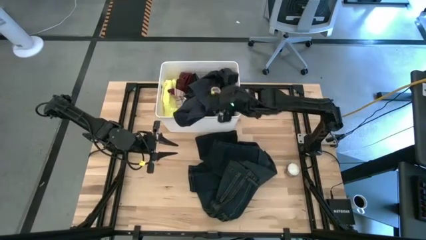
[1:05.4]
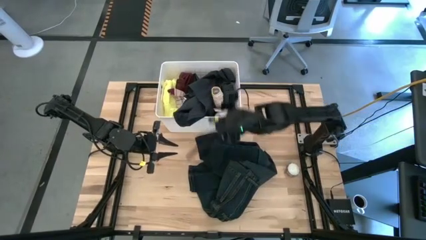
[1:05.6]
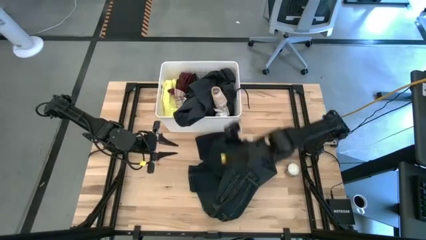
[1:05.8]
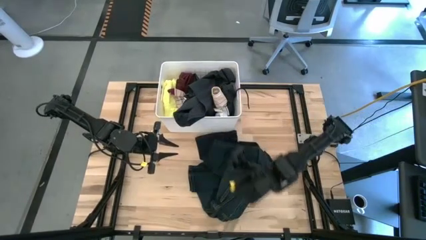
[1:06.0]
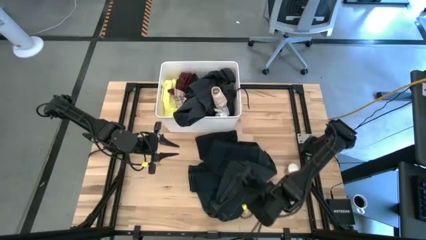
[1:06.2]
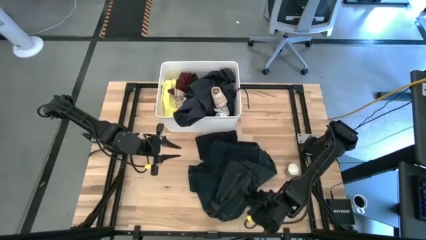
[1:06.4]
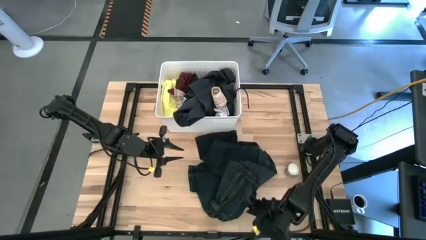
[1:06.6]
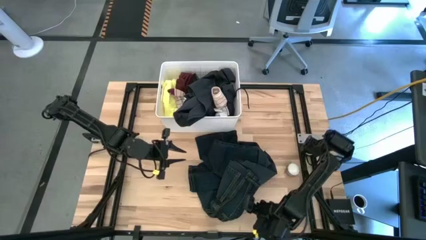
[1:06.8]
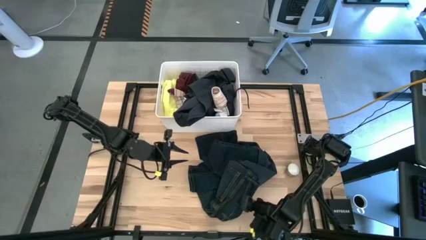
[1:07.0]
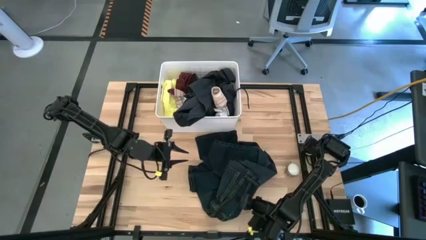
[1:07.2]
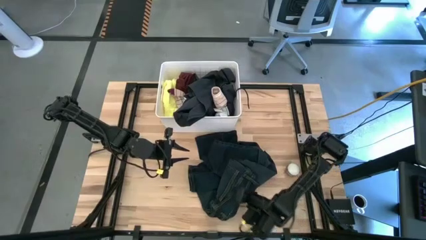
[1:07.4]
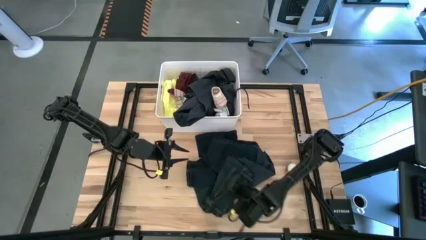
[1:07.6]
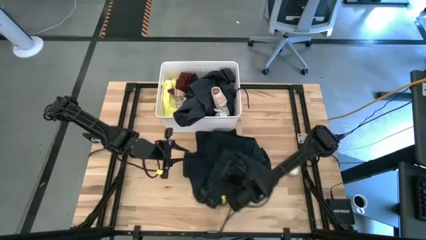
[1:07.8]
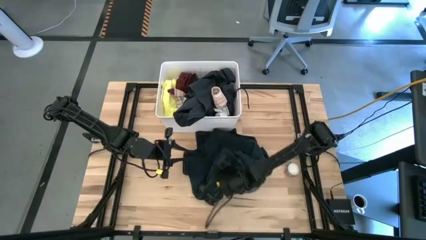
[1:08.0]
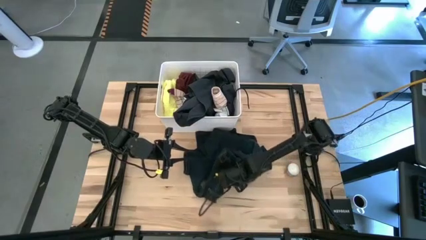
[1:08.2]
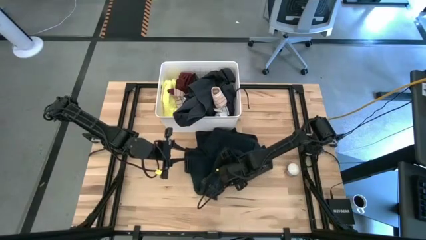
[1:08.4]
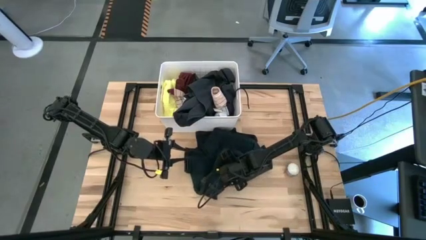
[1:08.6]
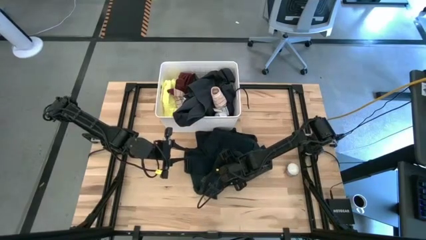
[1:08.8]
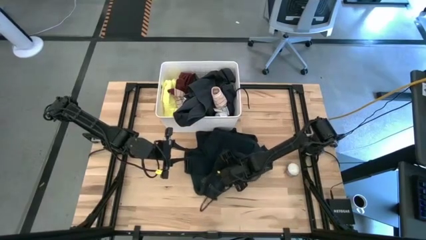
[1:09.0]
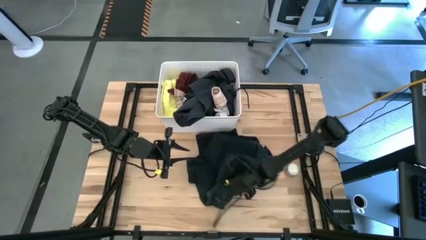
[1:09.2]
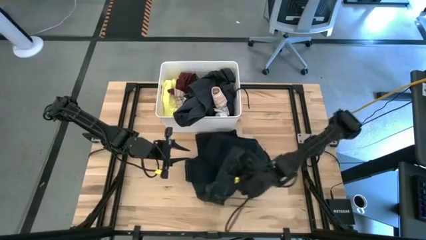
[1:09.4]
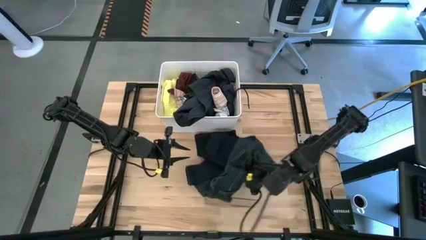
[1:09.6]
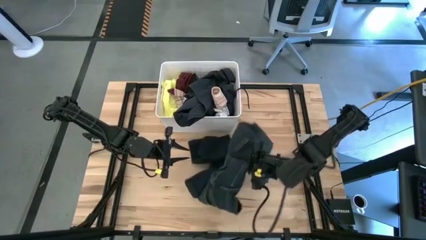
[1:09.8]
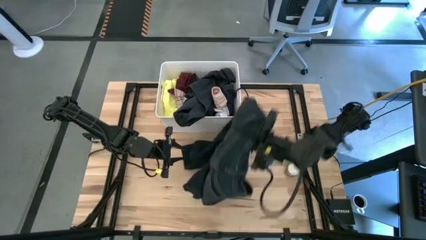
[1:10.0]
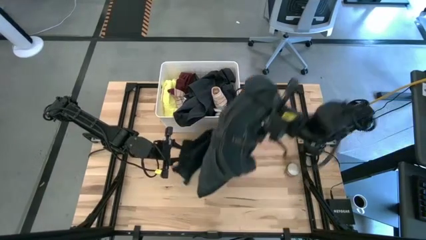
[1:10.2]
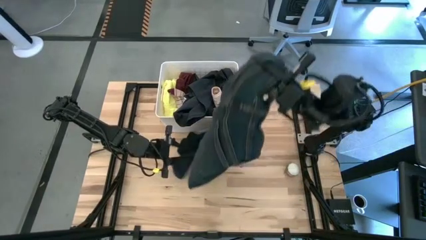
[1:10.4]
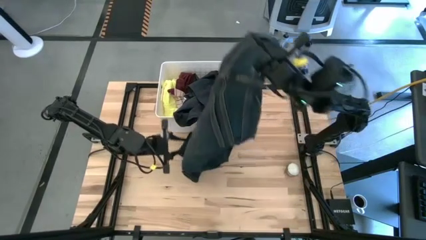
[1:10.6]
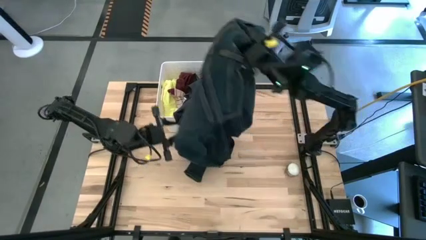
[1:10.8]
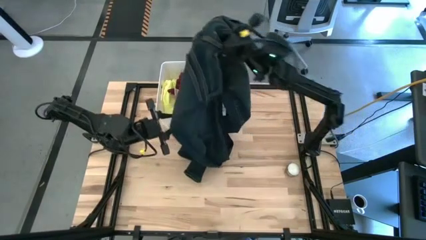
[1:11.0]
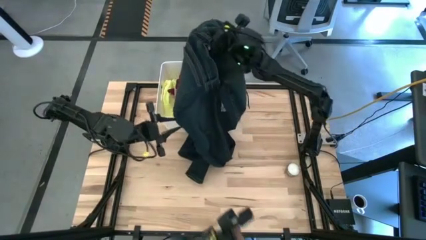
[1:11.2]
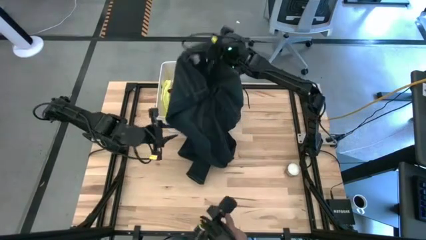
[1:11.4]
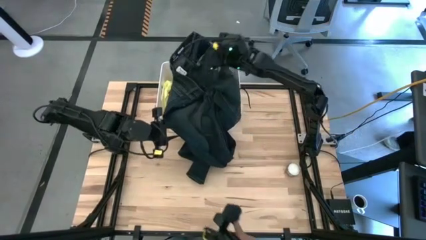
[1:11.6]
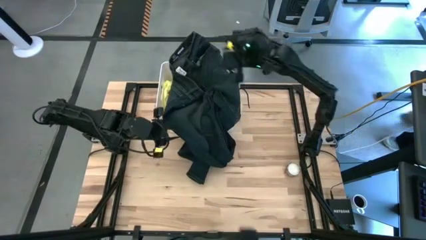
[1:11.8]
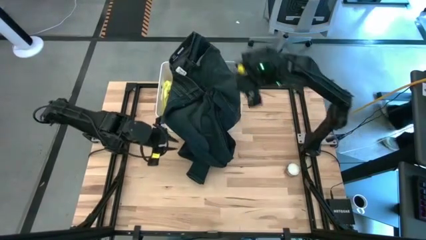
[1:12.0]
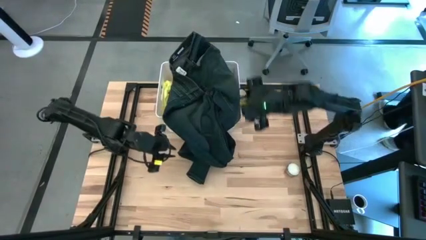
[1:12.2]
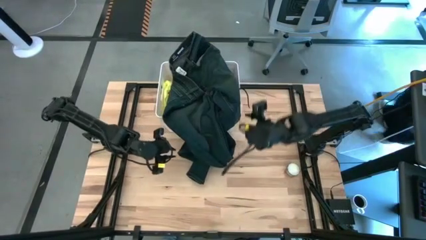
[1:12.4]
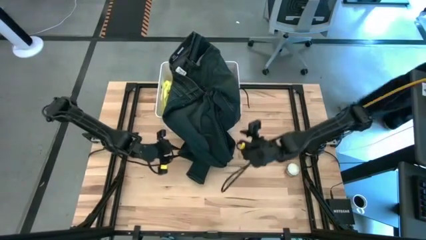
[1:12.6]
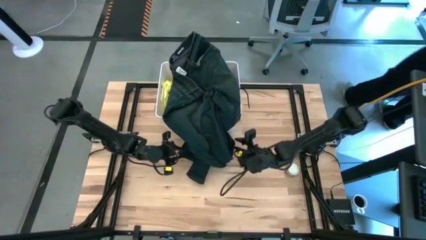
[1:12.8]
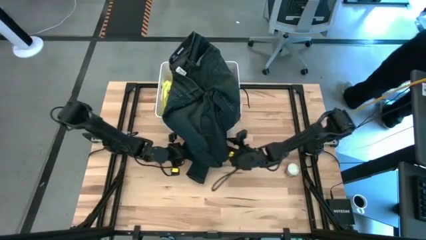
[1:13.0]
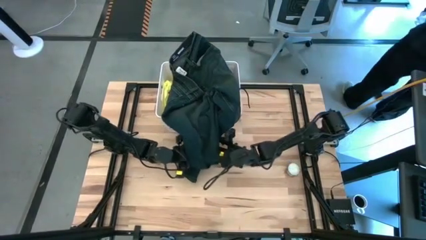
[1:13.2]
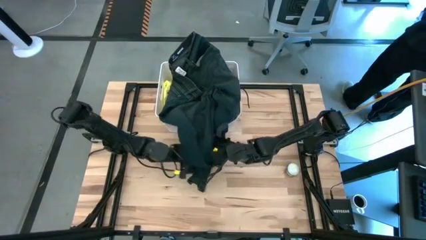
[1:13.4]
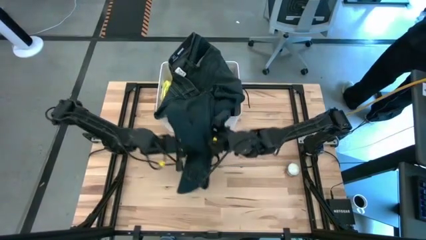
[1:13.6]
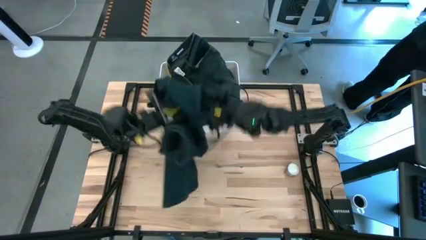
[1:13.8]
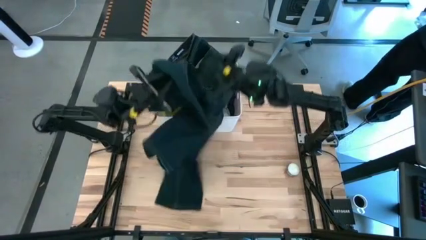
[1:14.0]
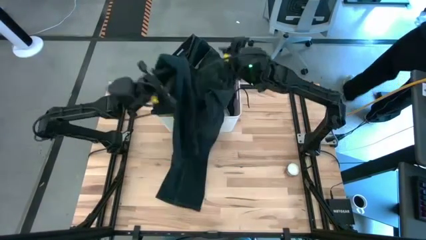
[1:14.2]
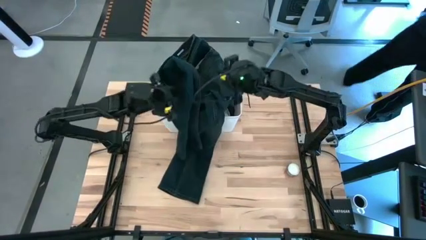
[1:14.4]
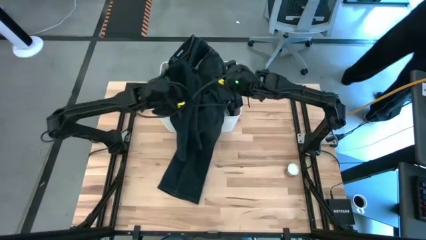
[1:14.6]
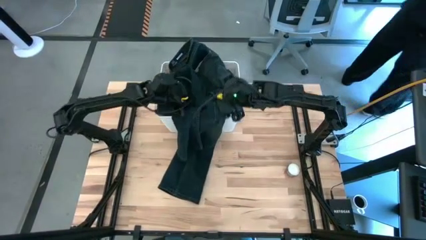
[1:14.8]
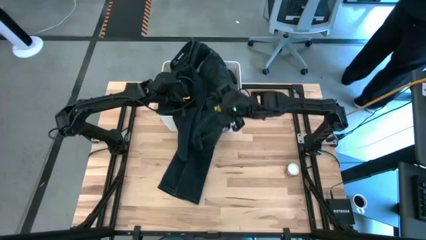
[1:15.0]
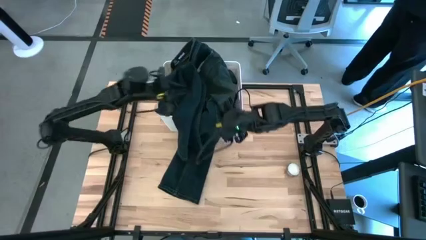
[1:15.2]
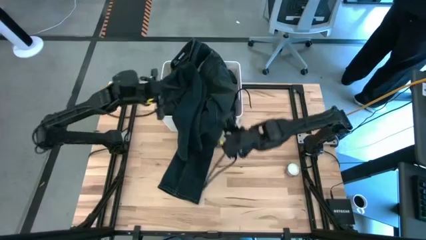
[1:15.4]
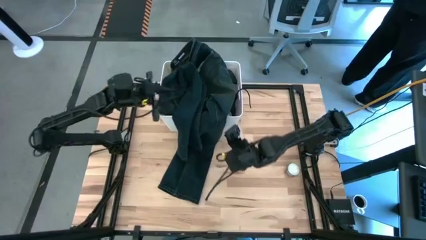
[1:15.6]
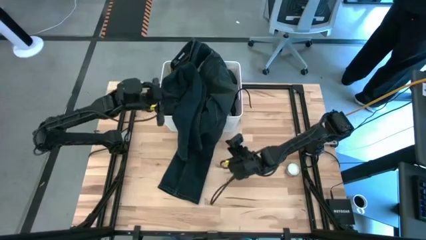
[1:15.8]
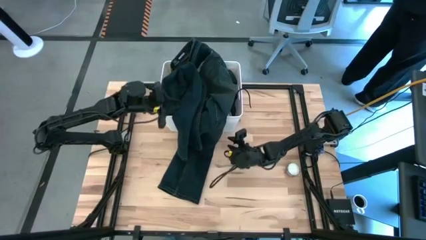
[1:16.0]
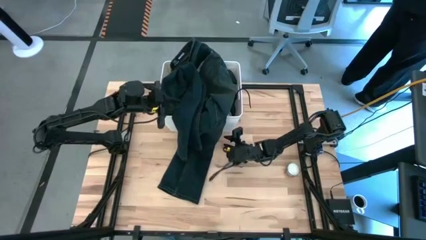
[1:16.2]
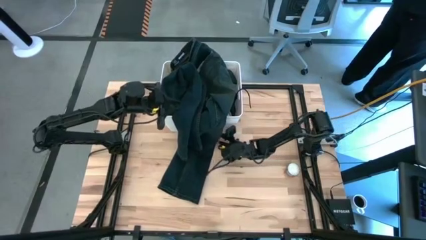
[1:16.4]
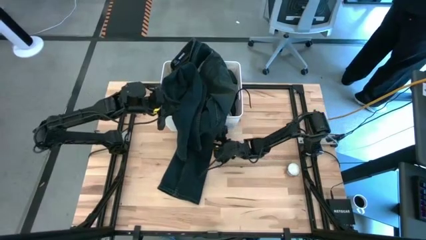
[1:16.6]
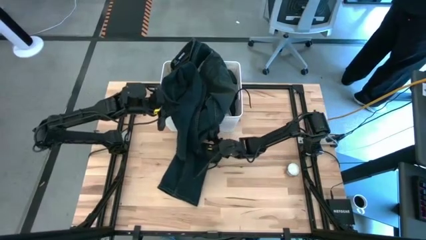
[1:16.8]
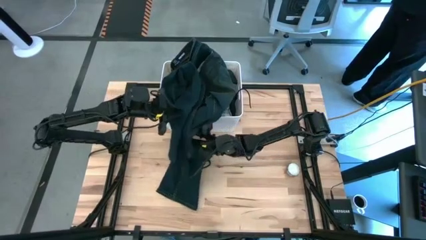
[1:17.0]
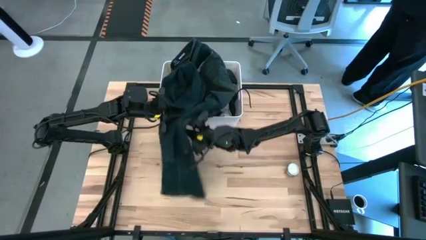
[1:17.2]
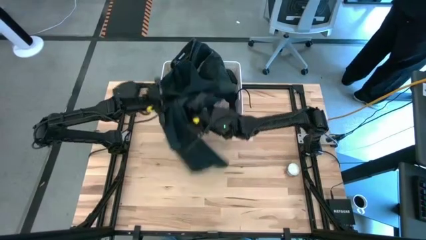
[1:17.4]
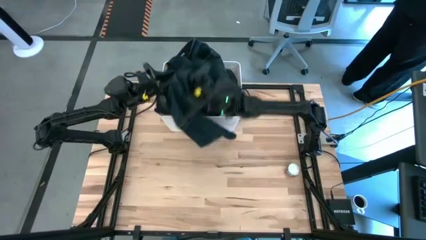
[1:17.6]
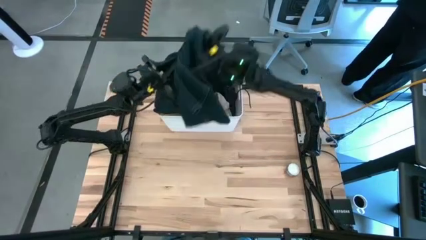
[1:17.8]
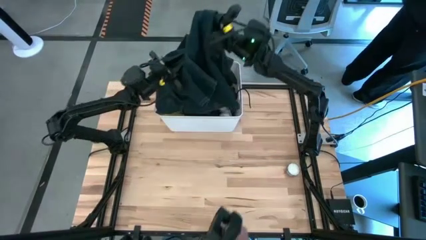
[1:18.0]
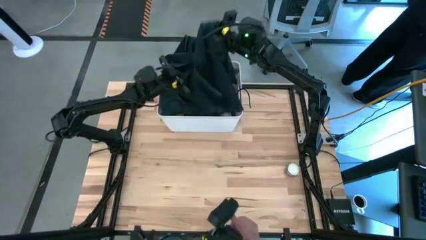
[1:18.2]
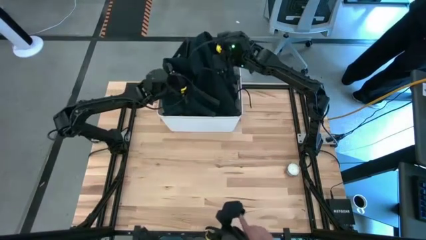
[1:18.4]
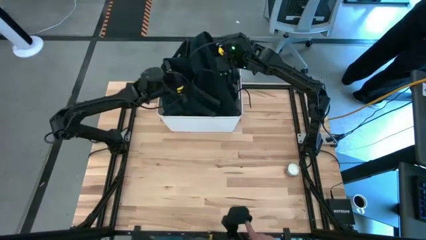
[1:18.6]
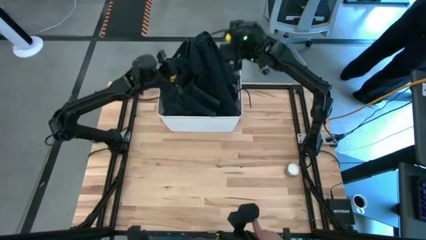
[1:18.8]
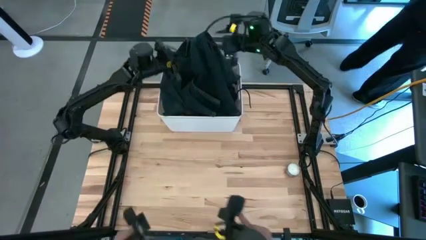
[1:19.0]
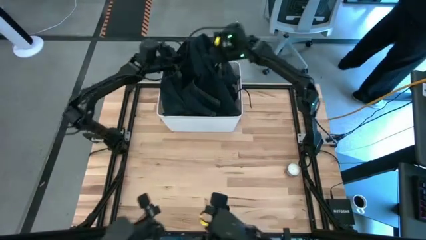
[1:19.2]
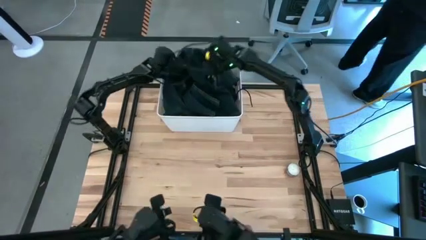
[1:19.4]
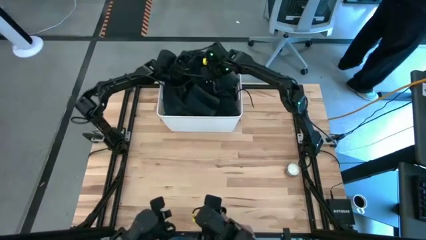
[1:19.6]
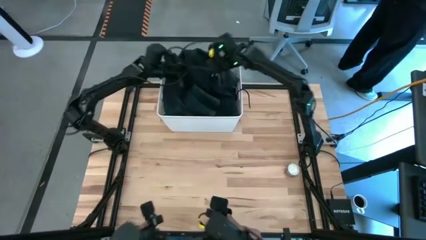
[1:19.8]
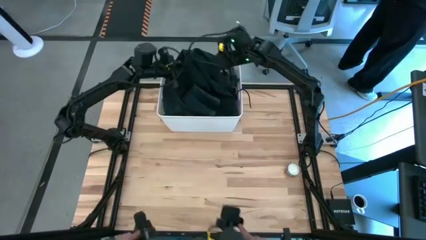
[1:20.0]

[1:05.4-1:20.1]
Task: Sort clothes
Put the dark blue jeans into the white laundry organizer
